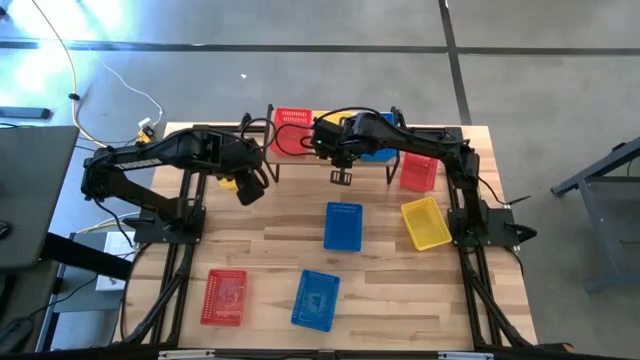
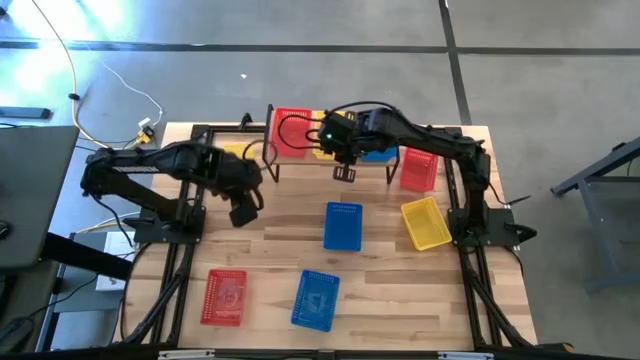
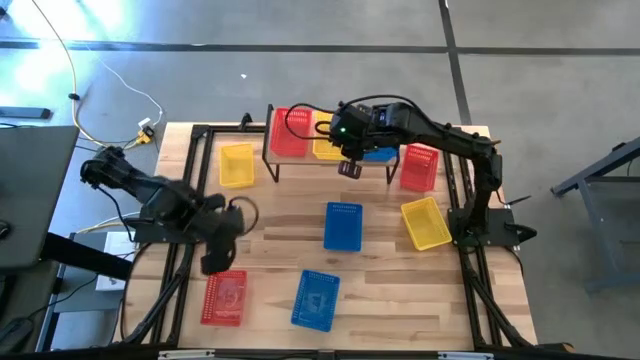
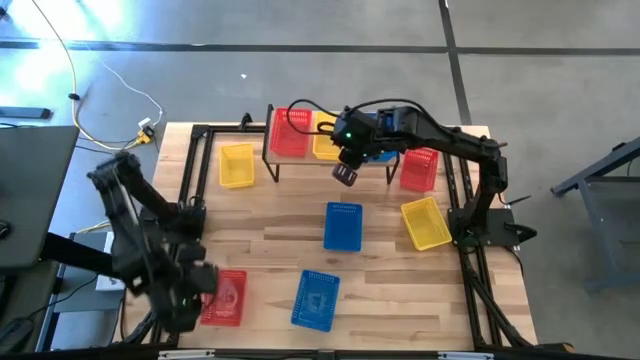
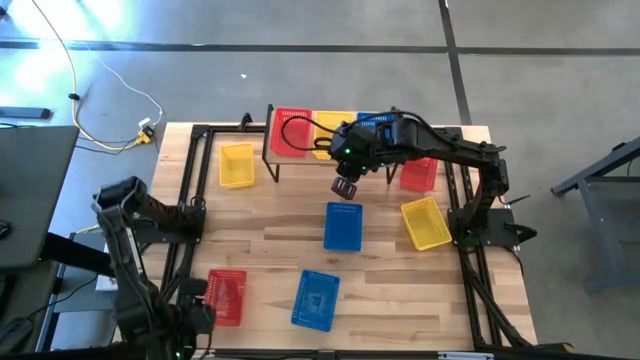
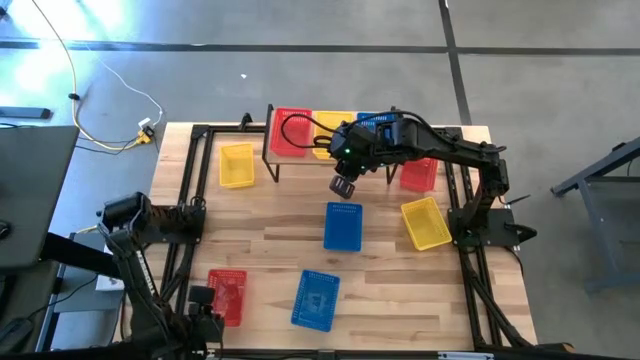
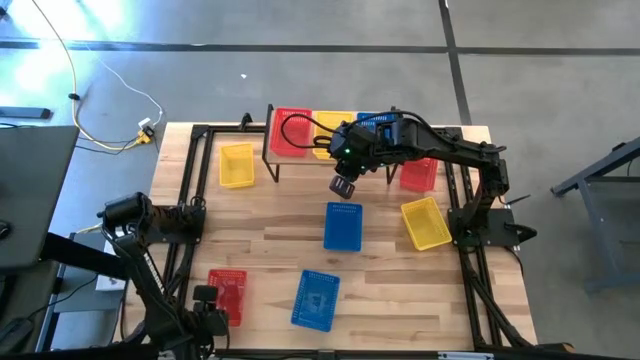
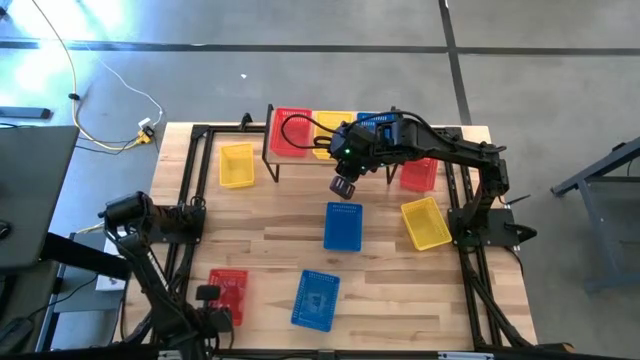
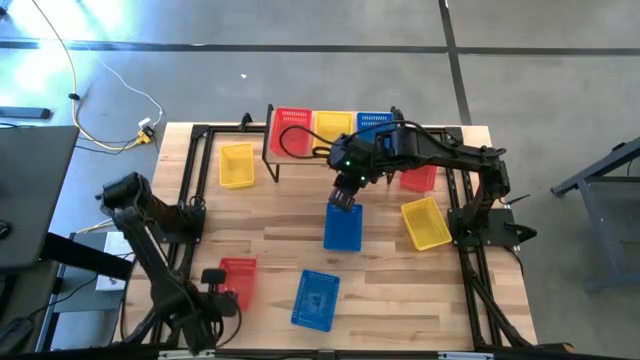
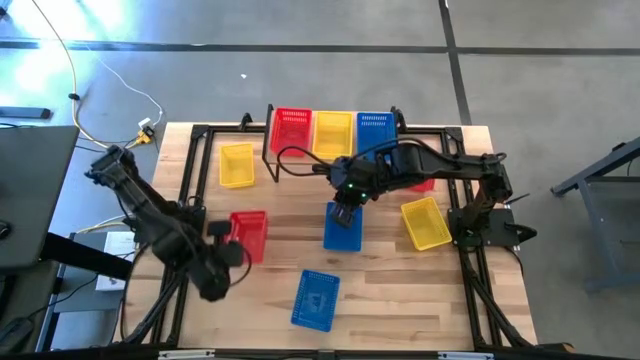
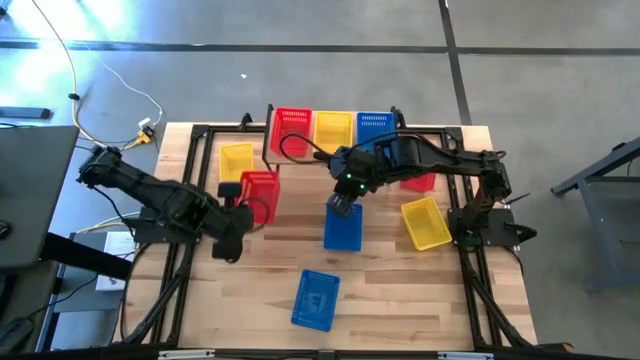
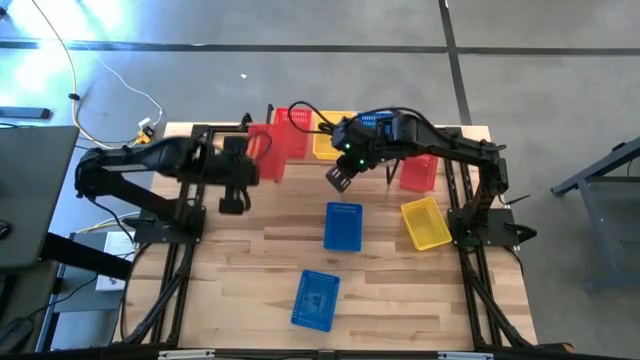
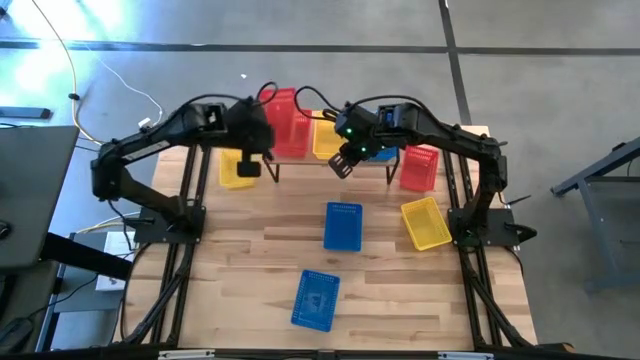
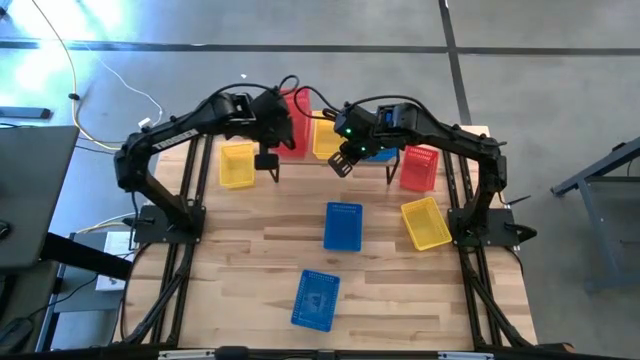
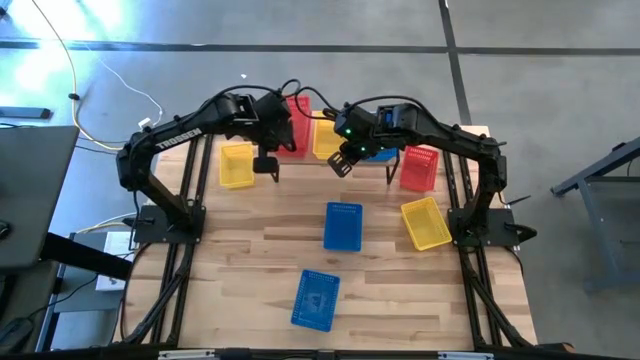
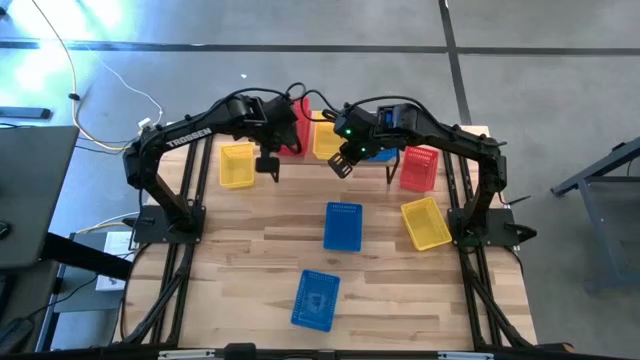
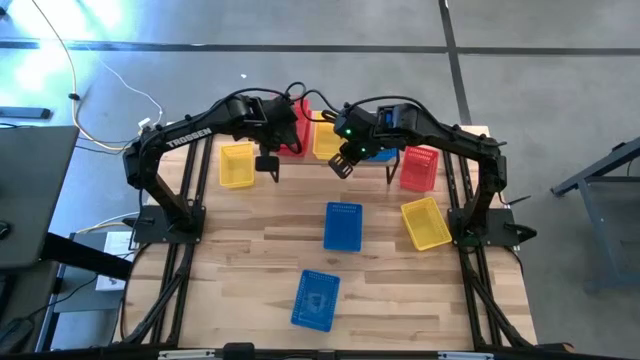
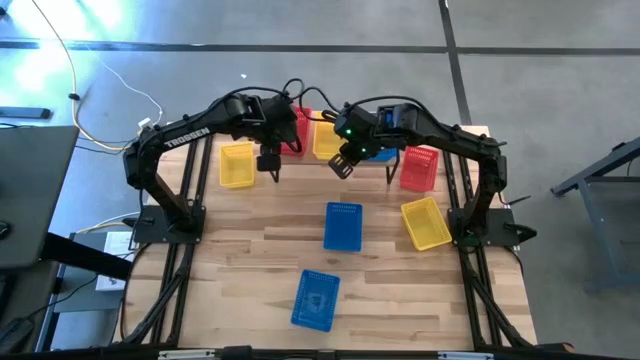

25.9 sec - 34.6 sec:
Task: Stack baskets on shelf by color
Stack the bottom red basket on top of the red basket on the shelf

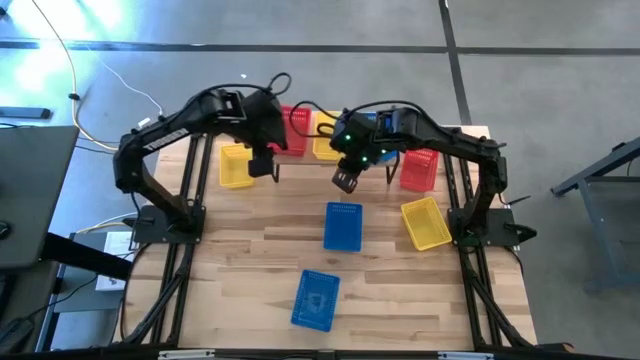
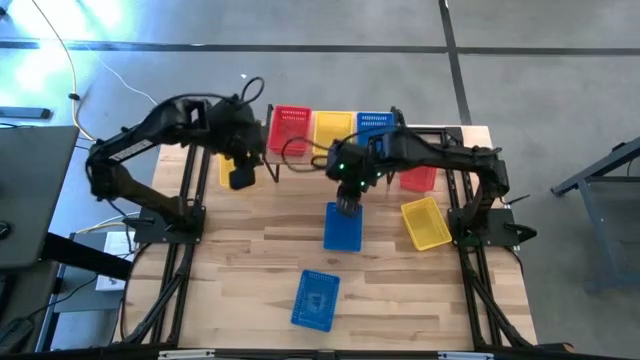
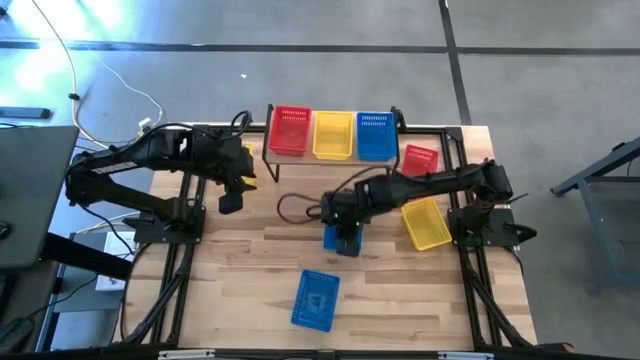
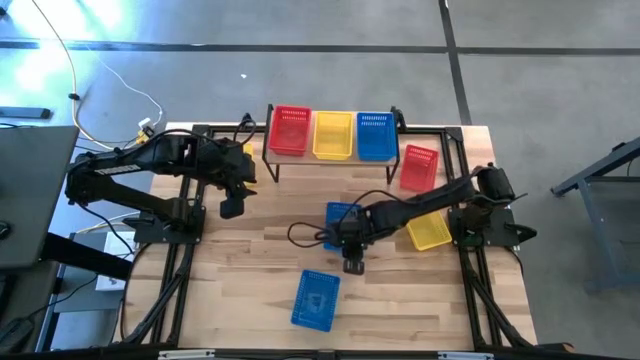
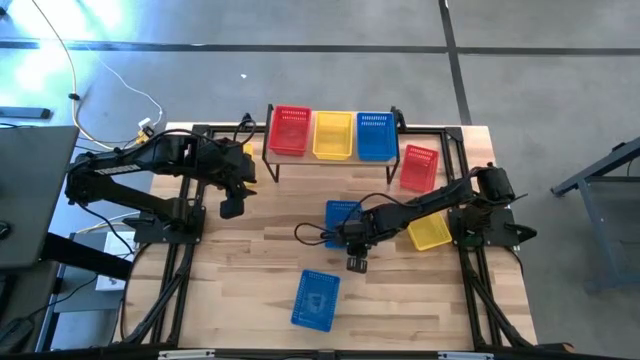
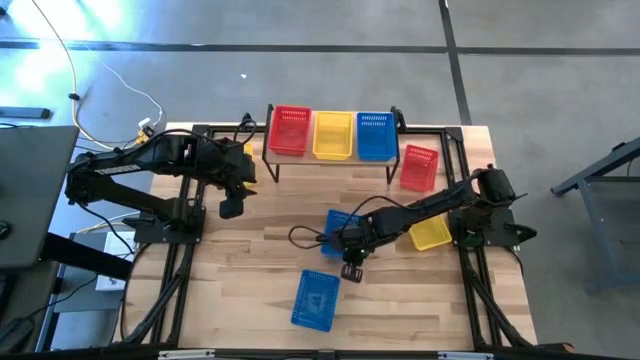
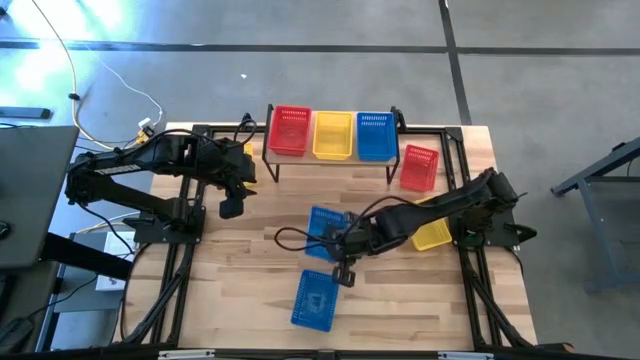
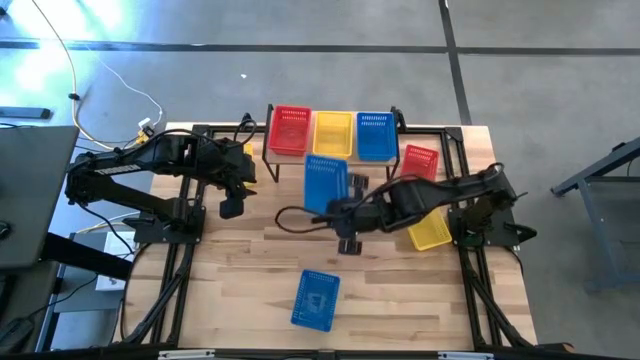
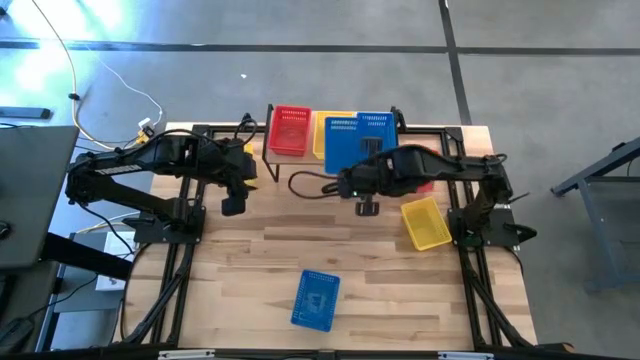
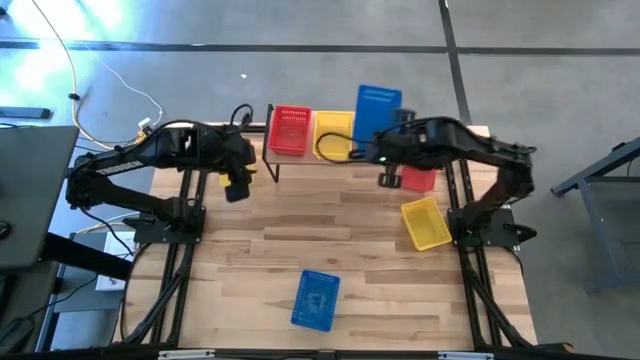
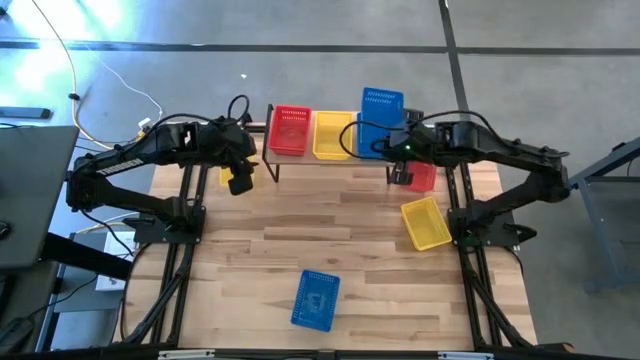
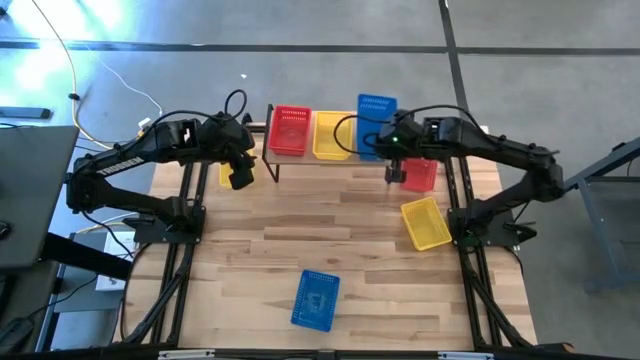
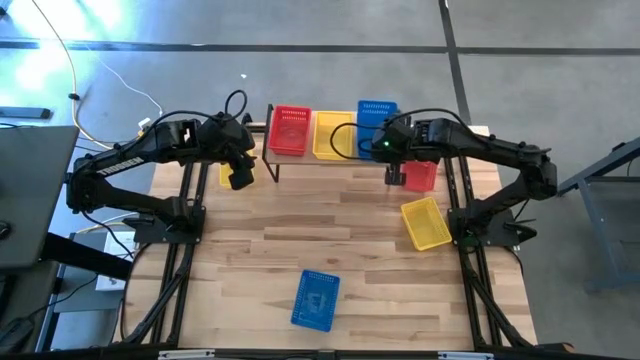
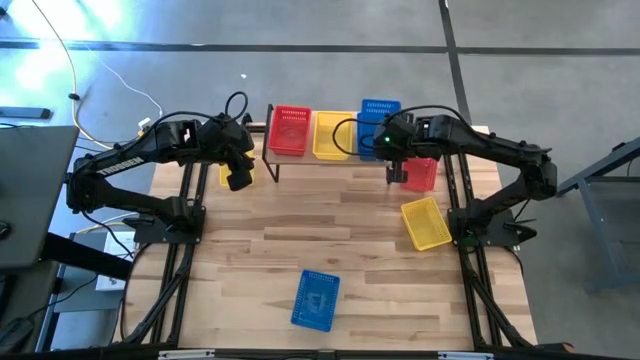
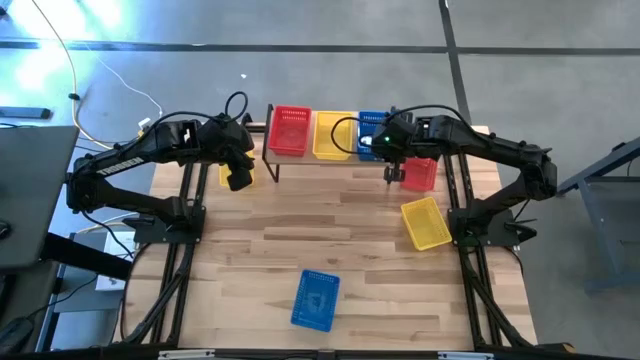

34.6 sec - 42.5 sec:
Stack the top blue basket on top of the blue basket on the shelf

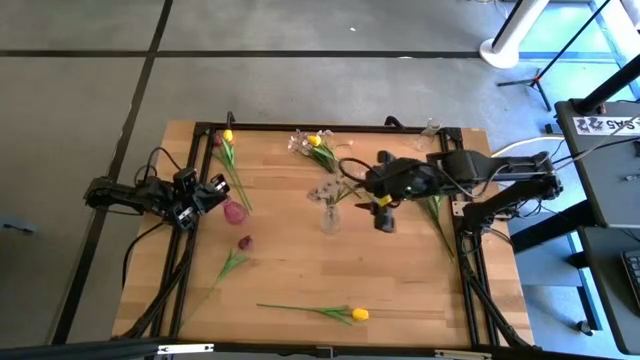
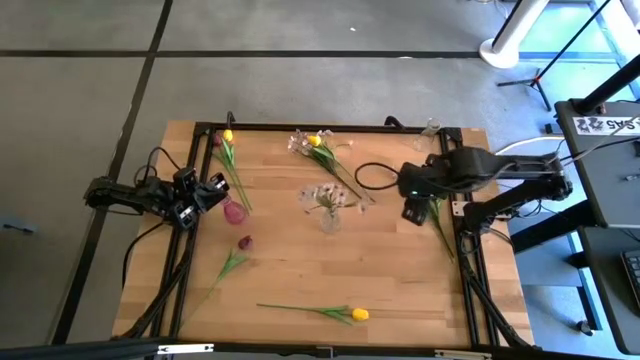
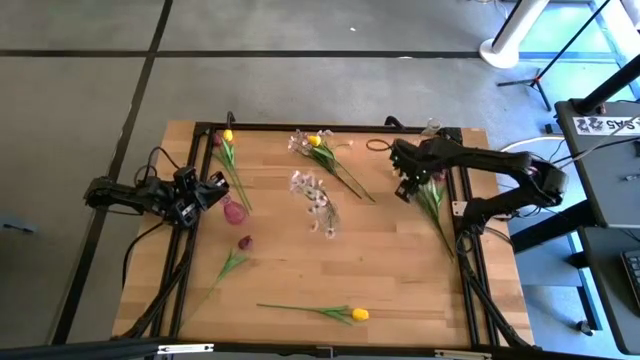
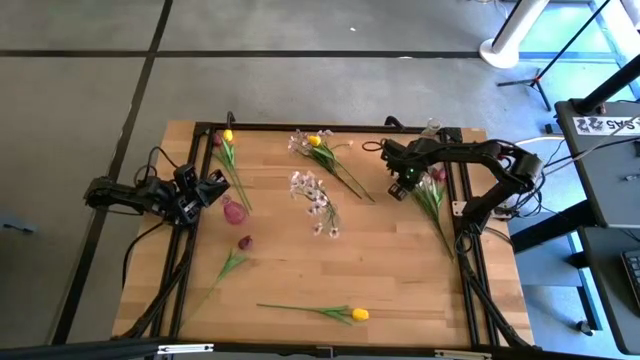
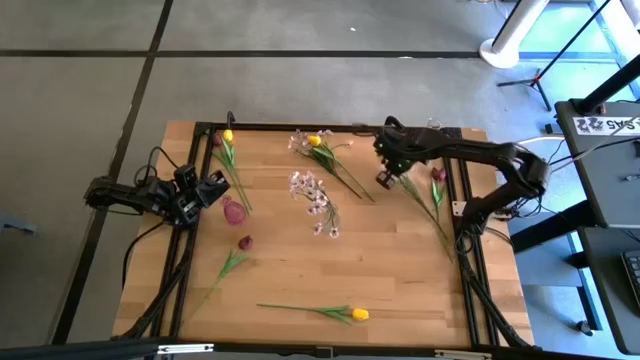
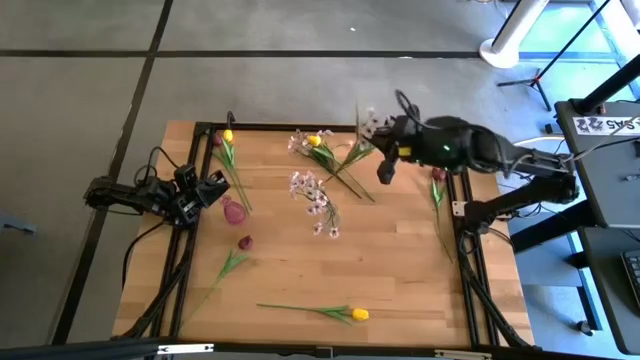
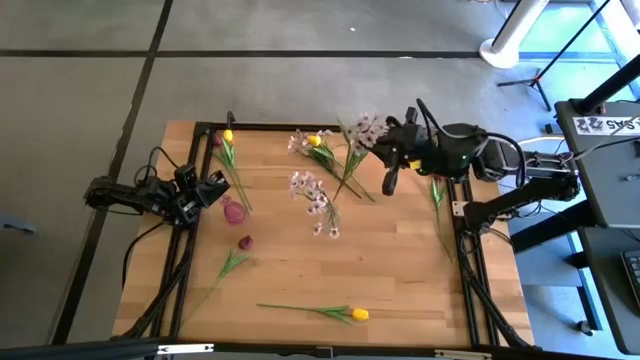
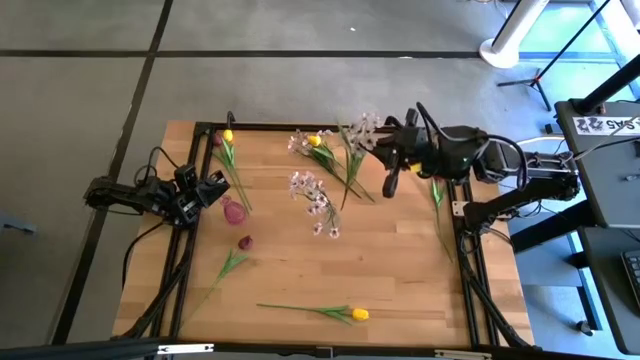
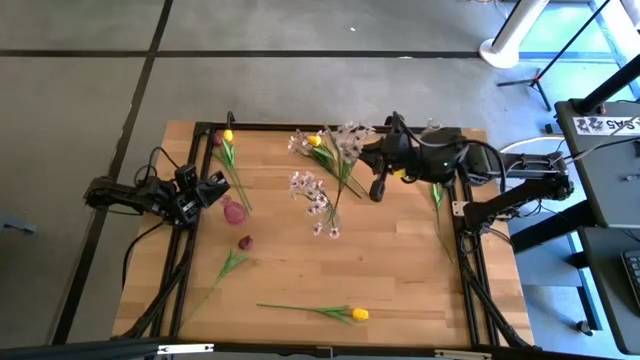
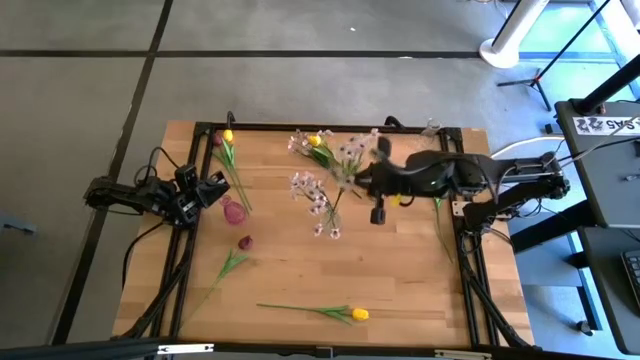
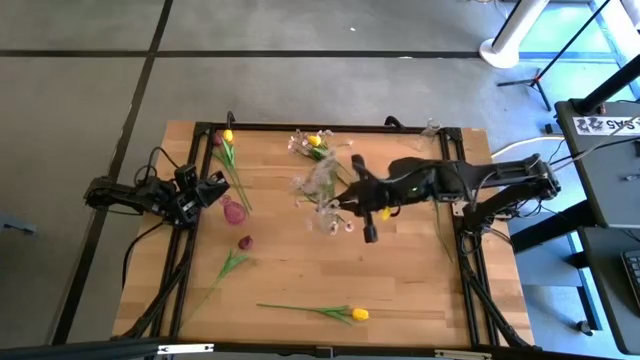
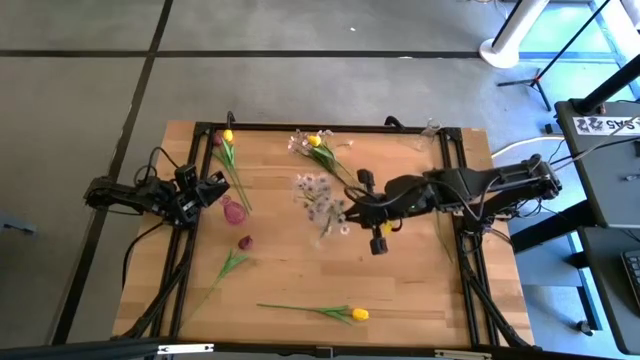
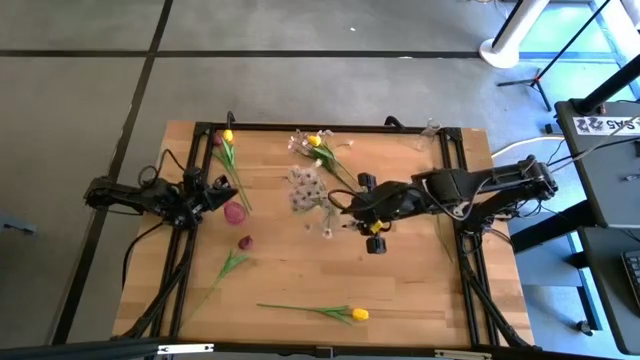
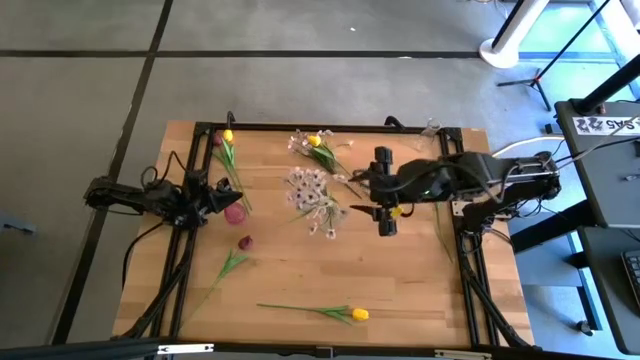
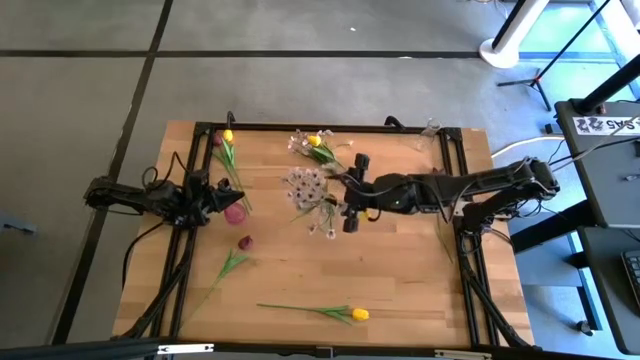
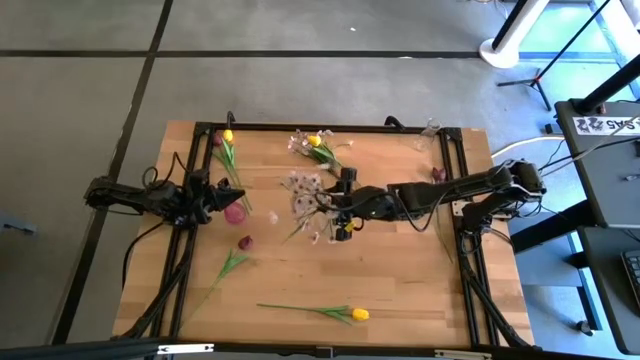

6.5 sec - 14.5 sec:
Task: Sort flowers into vase by color
Put the right white flowers into the bottom transparent vase
